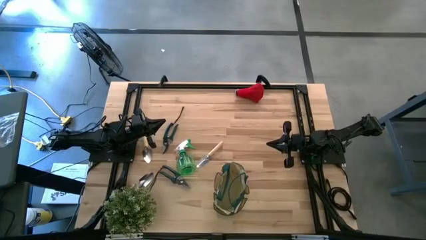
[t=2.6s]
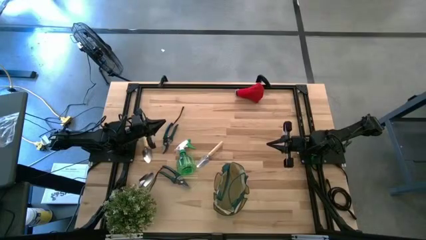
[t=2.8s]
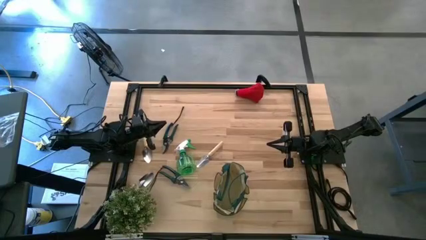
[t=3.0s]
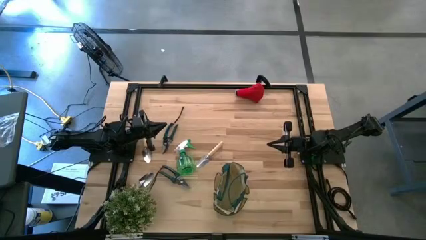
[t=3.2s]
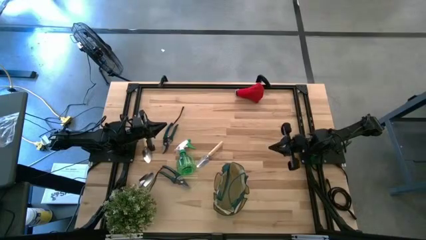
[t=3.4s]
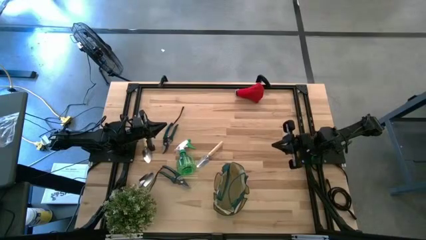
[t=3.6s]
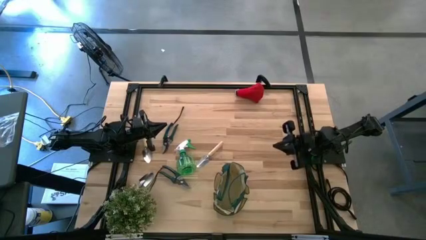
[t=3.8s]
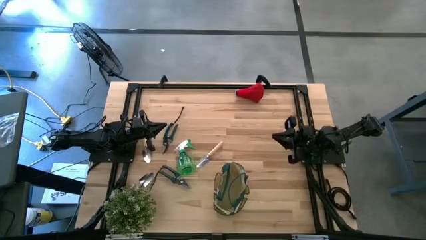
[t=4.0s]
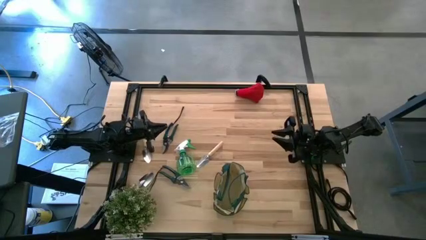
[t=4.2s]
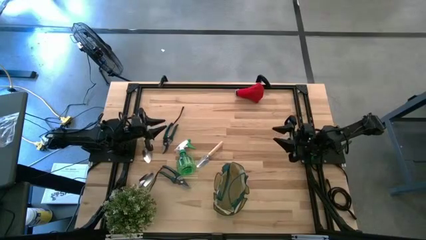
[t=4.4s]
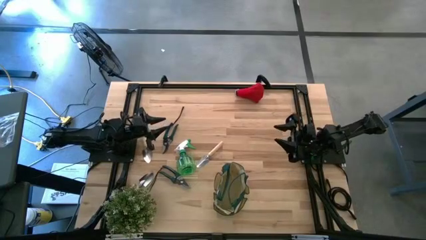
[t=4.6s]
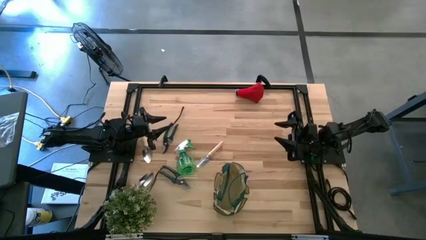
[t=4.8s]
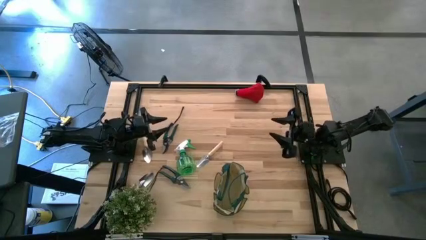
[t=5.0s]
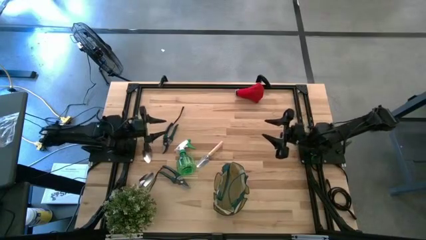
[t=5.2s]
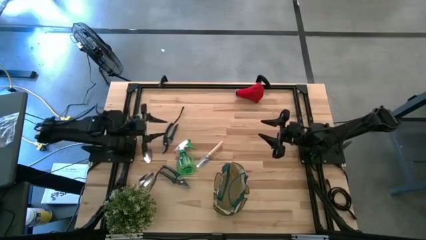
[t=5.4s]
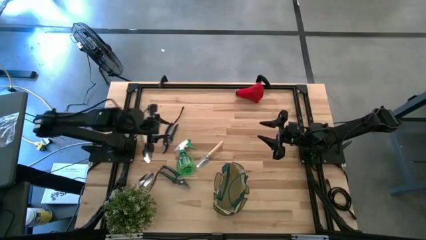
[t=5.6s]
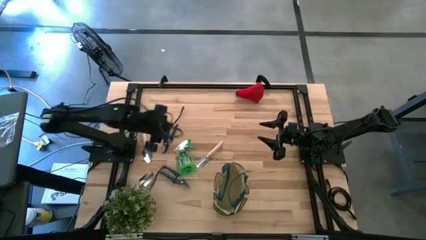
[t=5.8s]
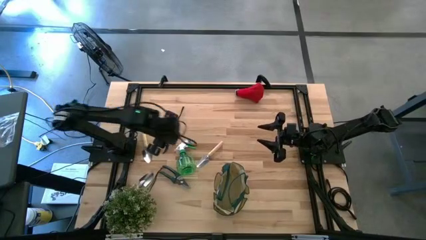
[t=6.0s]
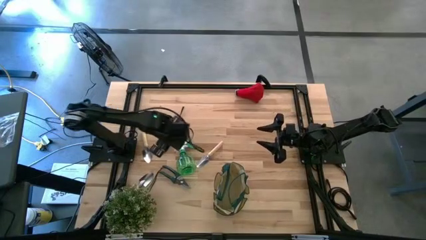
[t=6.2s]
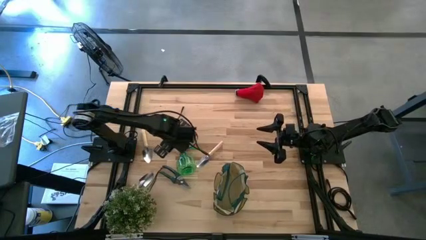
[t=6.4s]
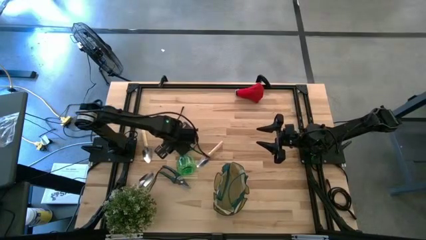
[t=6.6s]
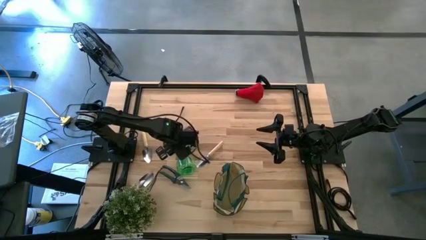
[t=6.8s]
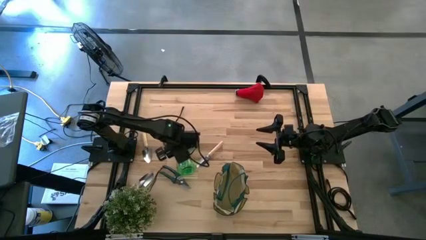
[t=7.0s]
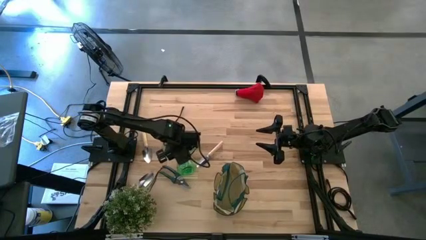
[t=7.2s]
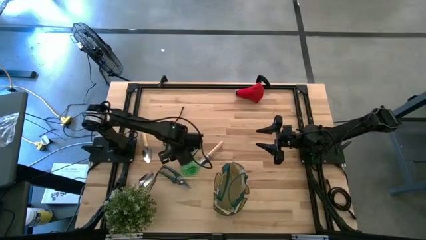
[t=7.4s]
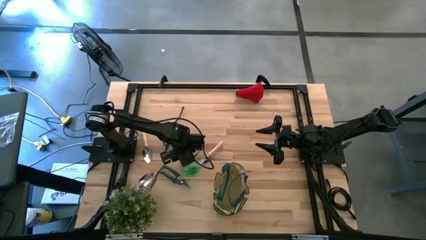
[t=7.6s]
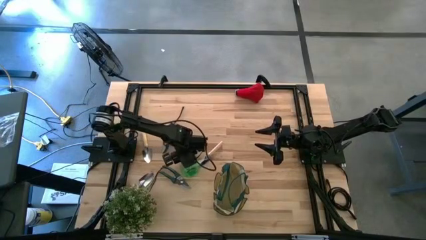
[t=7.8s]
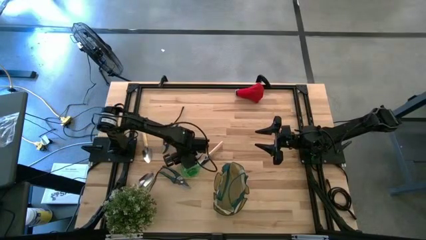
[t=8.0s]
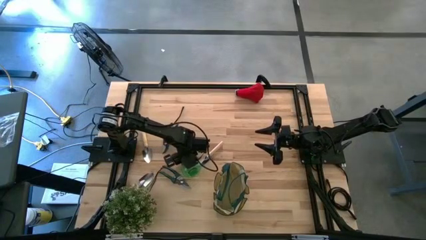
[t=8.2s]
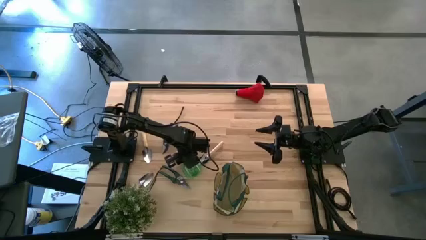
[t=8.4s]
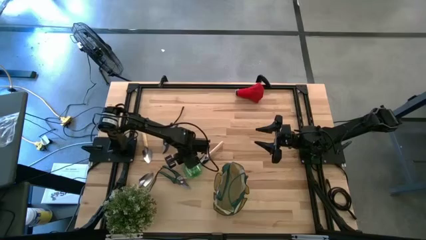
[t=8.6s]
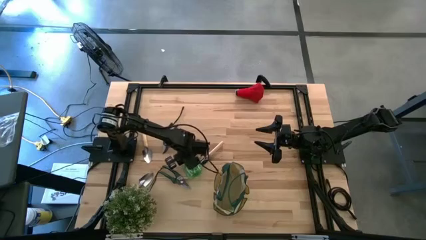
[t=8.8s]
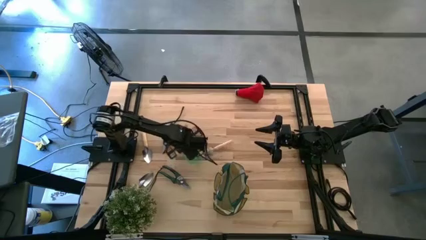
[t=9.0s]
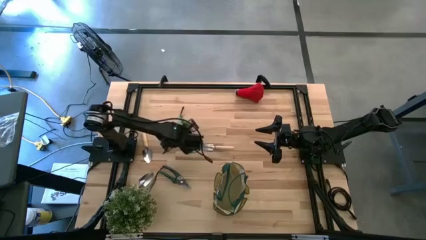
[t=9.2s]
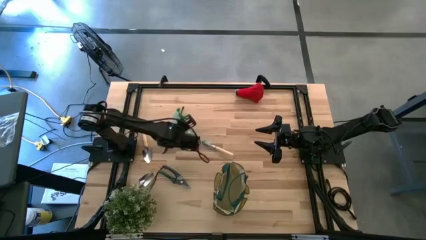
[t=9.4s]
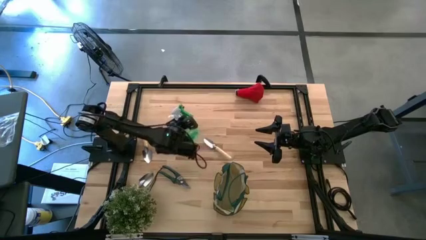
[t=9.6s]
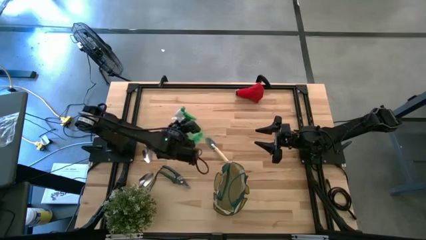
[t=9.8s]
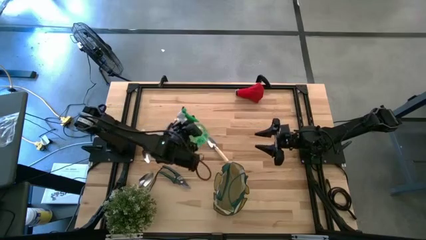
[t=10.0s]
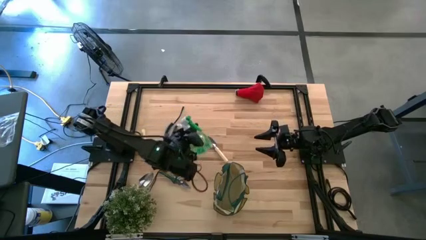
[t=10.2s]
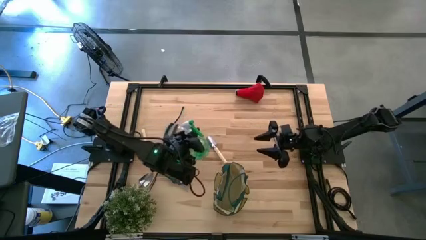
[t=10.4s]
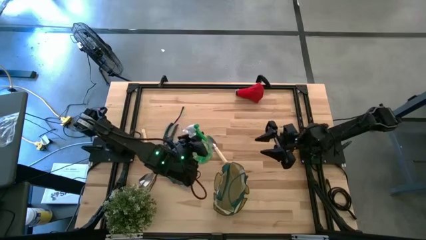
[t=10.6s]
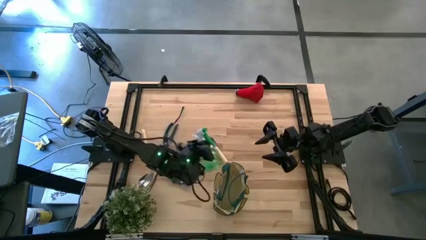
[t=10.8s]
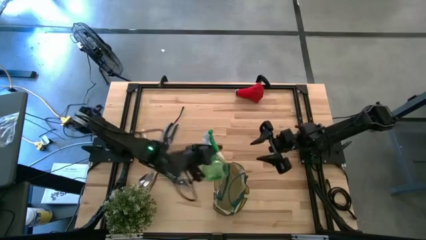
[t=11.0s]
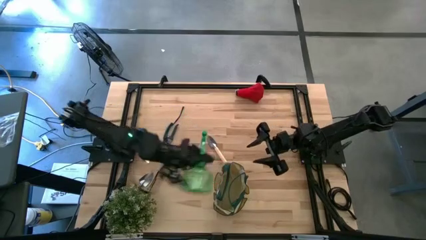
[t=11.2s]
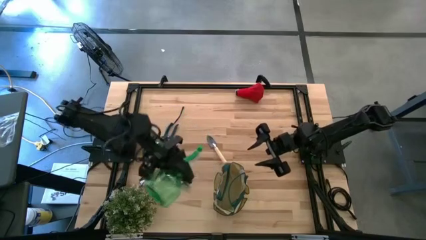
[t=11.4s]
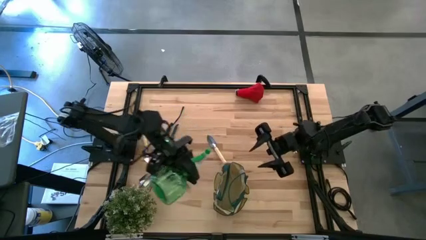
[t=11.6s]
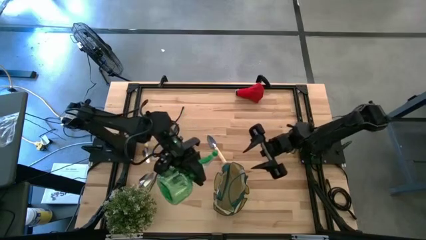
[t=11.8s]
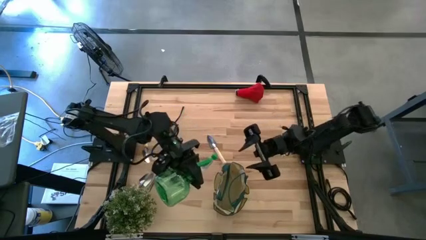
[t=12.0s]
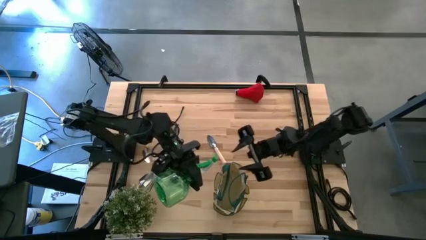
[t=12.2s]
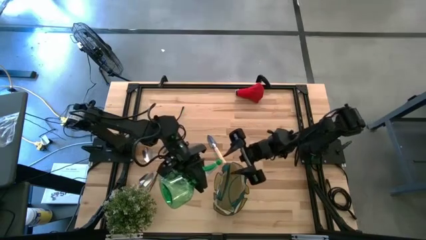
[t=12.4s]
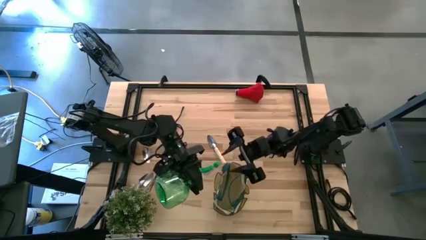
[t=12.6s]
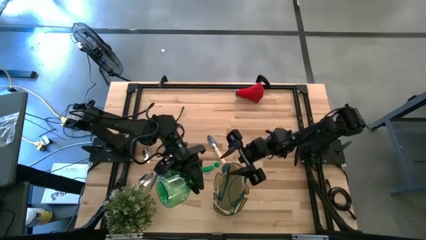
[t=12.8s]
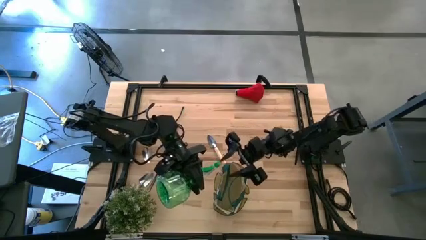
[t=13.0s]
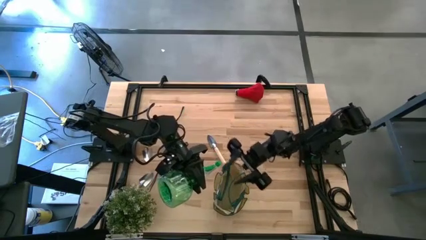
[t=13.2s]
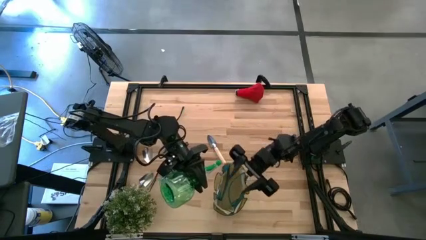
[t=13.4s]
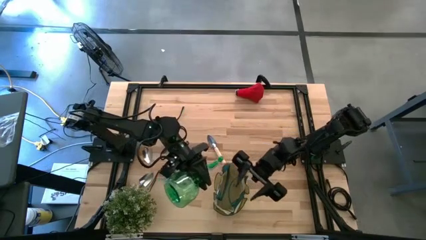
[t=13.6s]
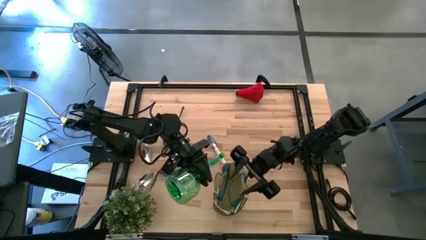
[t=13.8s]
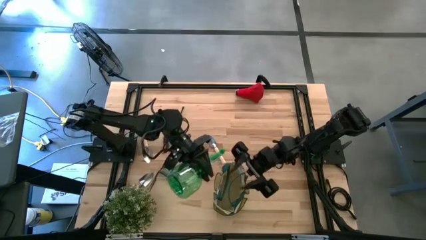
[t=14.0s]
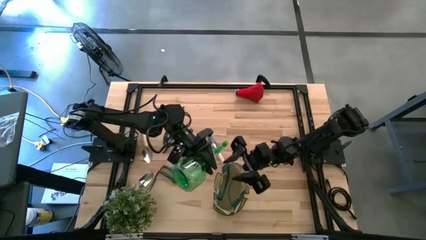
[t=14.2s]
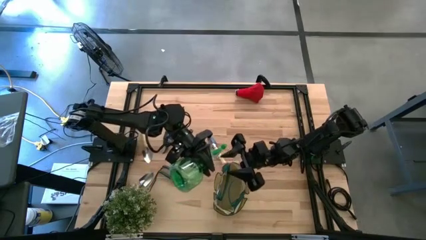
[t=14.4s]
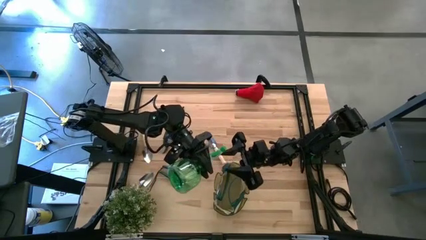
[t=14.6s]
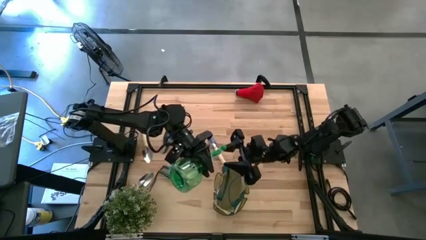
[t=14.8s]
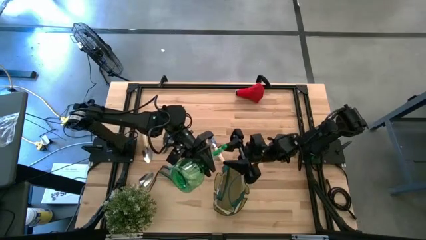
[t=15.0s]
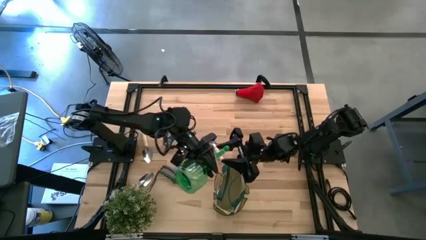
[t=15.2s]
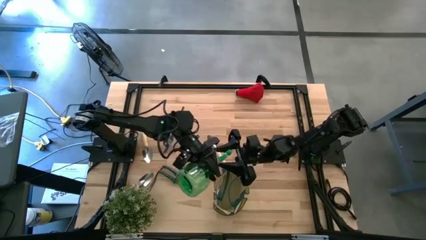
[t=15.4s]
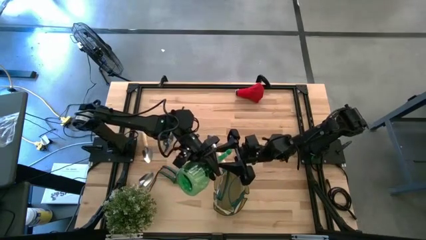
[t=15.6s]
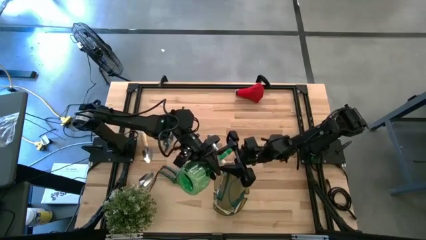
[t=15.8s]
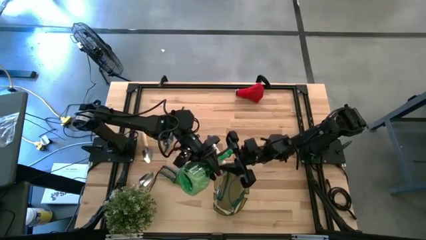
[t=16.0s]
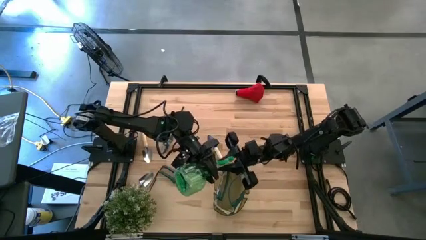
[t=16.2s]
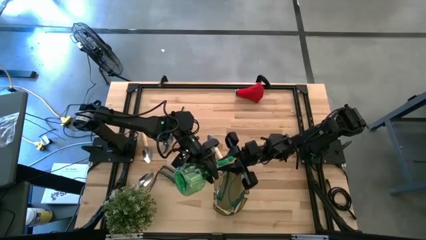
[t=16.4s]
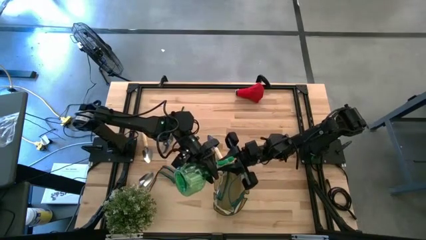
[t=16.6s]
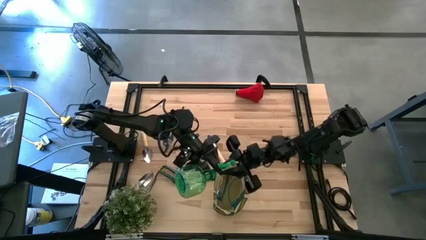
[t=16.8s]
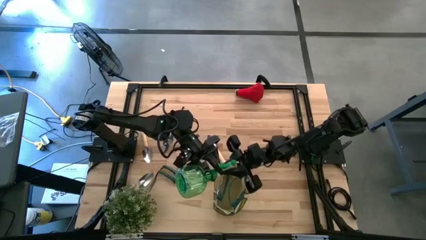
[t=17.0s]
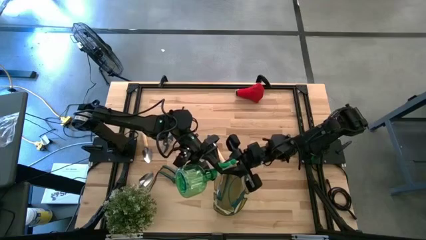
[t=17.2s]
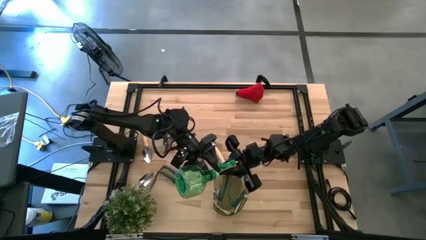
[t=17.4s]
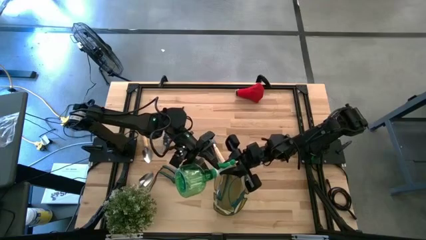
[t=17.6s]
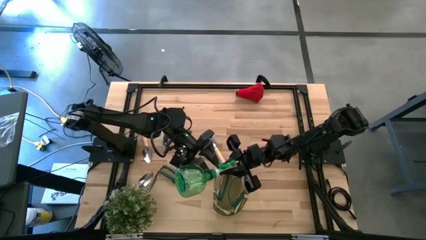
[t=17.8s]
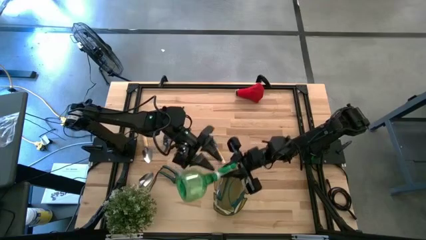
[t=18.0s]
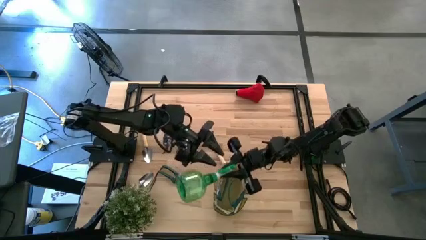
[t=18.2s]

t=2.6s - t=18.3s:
Task: Pick & Place Garden tools in Gardening bag
Put the green spray bottle into the green gardening bag
